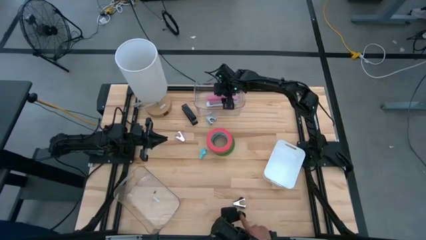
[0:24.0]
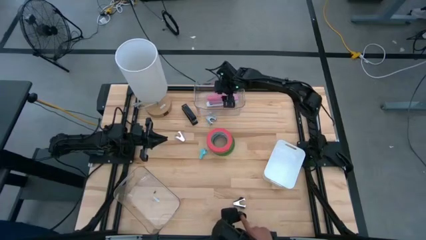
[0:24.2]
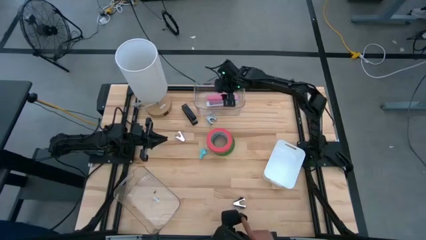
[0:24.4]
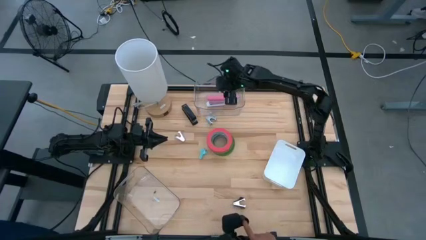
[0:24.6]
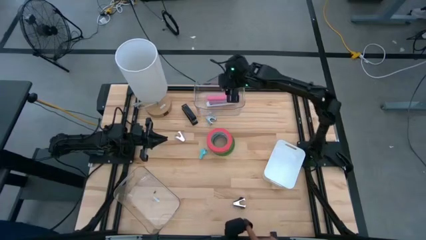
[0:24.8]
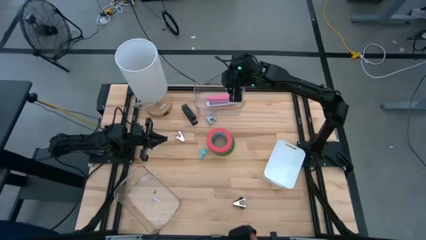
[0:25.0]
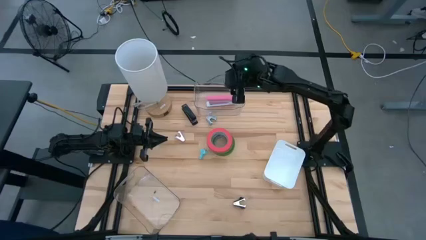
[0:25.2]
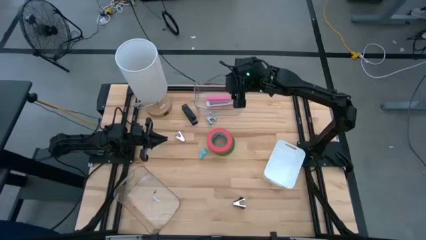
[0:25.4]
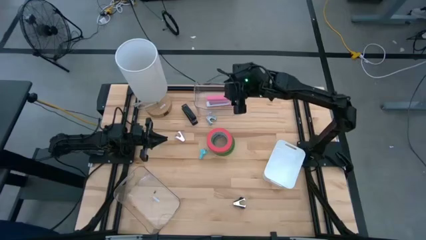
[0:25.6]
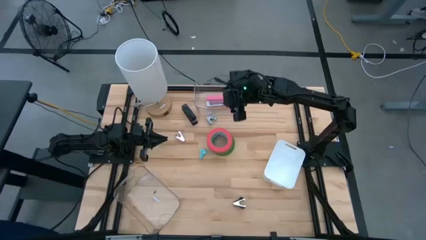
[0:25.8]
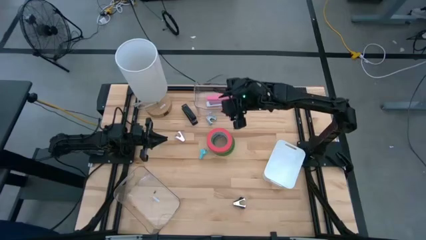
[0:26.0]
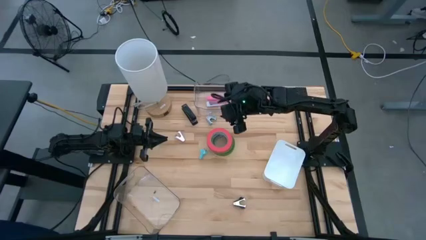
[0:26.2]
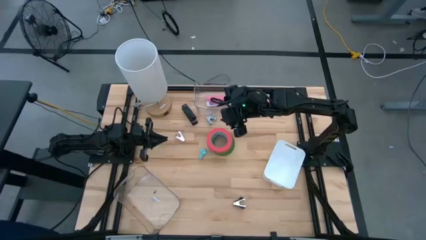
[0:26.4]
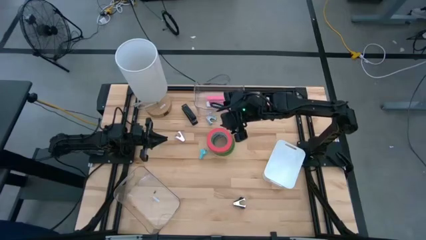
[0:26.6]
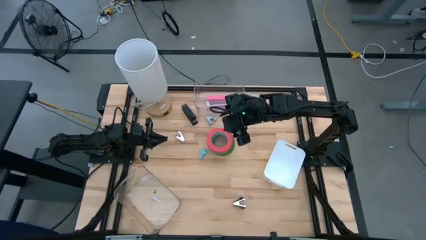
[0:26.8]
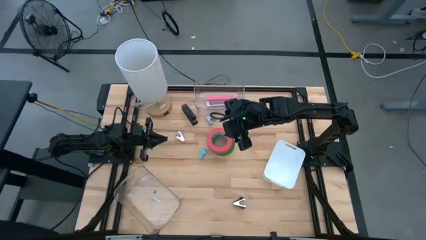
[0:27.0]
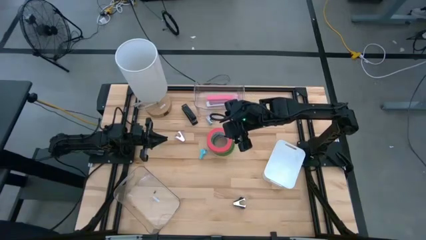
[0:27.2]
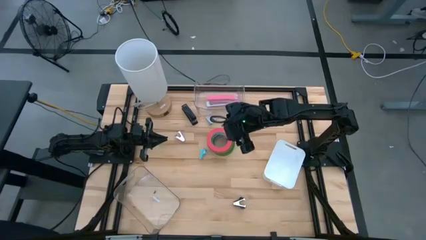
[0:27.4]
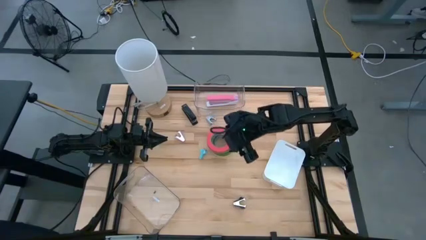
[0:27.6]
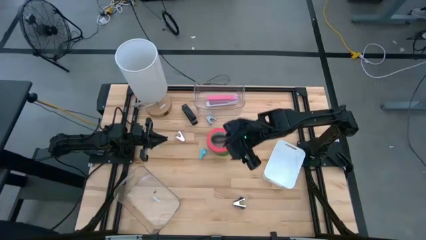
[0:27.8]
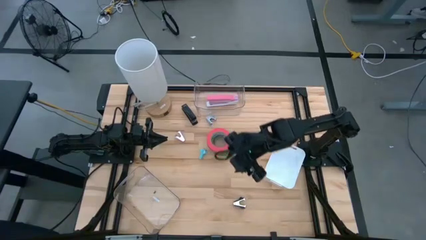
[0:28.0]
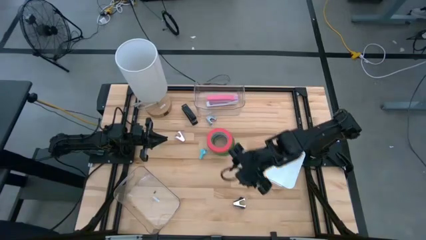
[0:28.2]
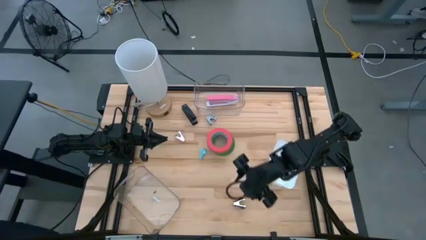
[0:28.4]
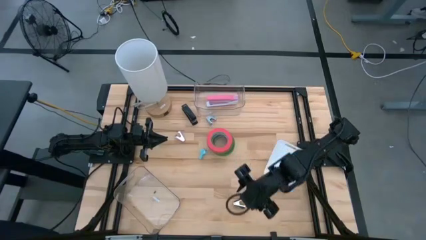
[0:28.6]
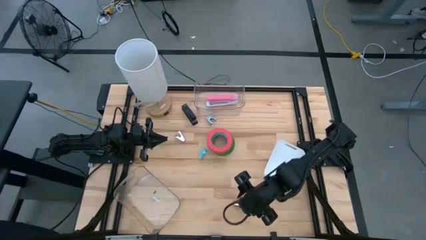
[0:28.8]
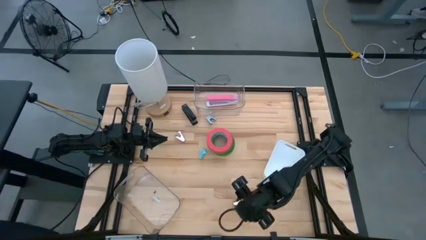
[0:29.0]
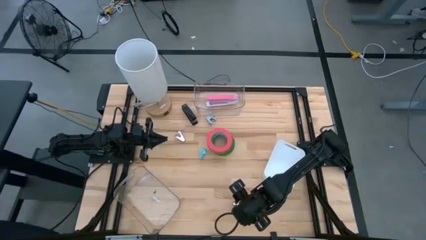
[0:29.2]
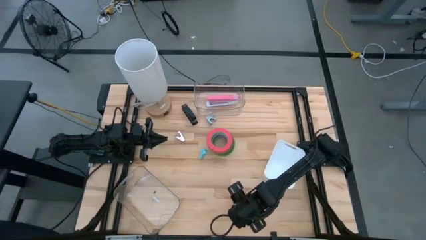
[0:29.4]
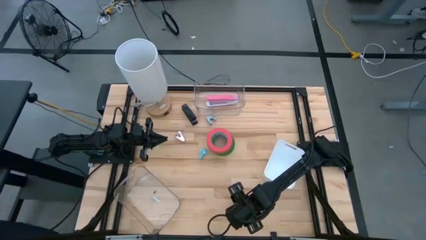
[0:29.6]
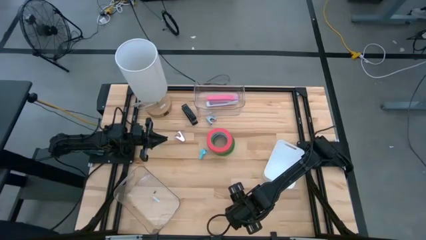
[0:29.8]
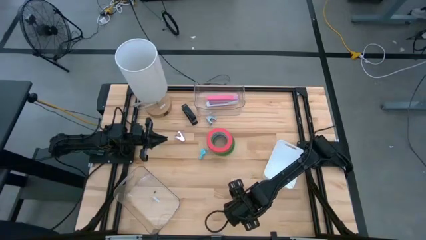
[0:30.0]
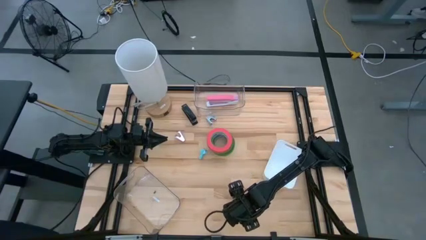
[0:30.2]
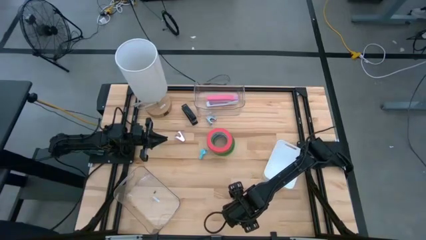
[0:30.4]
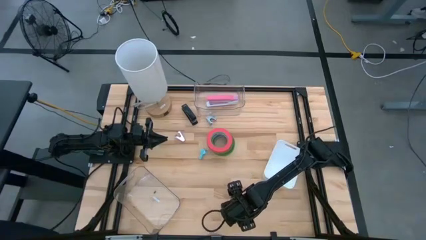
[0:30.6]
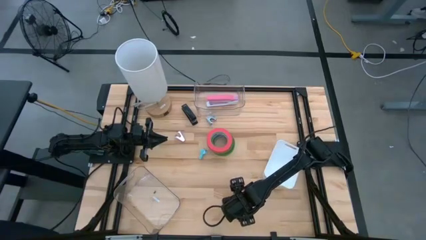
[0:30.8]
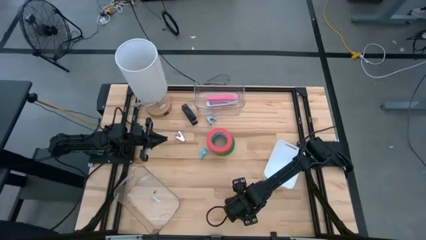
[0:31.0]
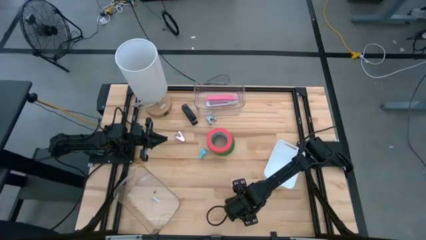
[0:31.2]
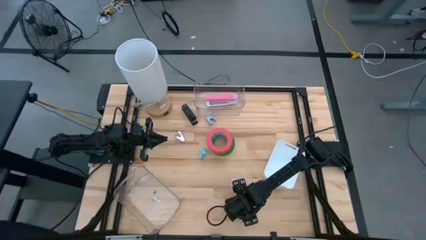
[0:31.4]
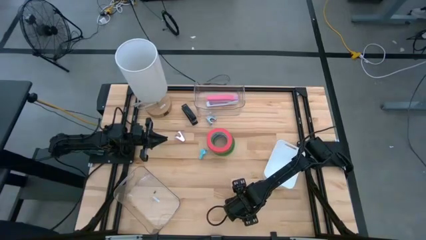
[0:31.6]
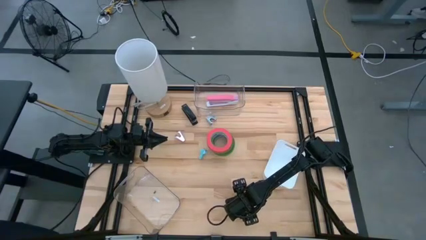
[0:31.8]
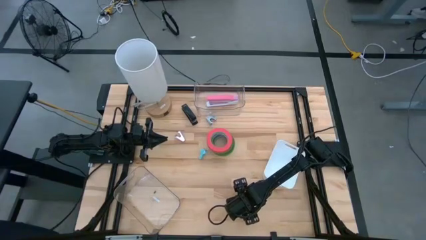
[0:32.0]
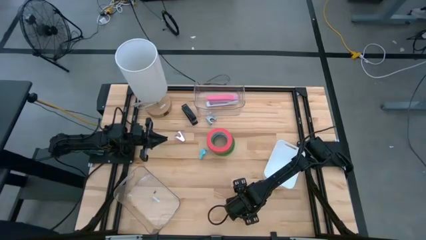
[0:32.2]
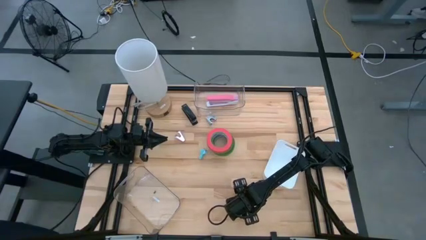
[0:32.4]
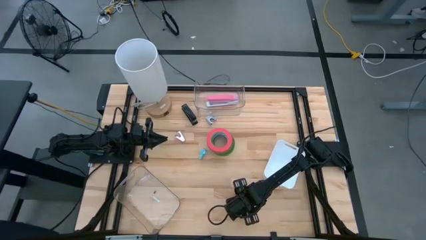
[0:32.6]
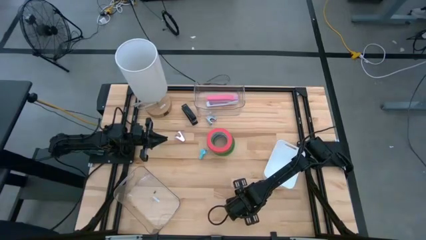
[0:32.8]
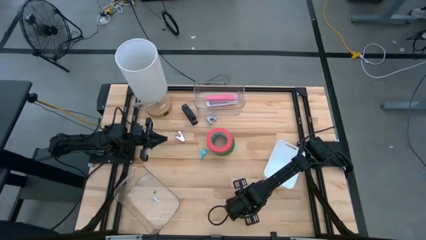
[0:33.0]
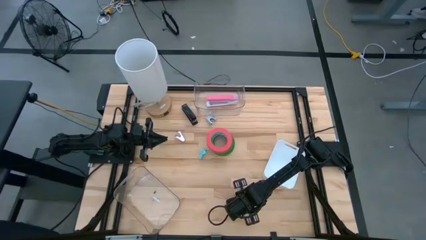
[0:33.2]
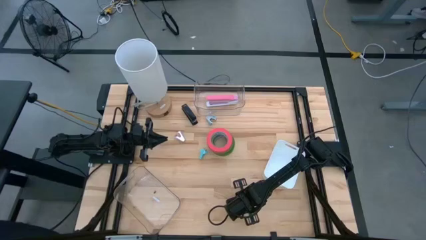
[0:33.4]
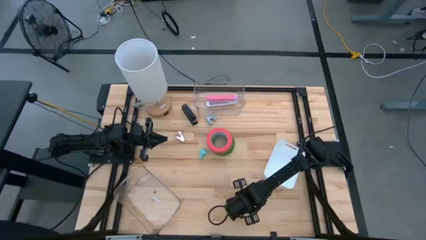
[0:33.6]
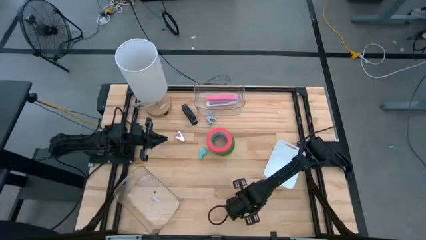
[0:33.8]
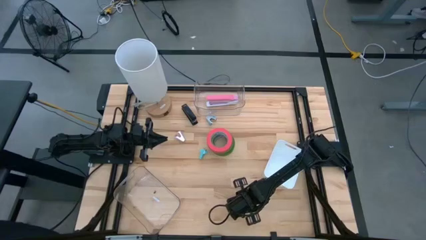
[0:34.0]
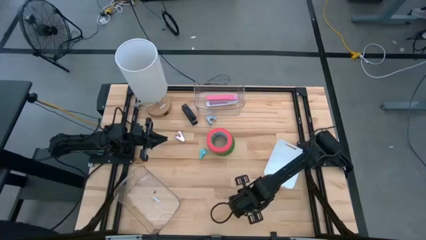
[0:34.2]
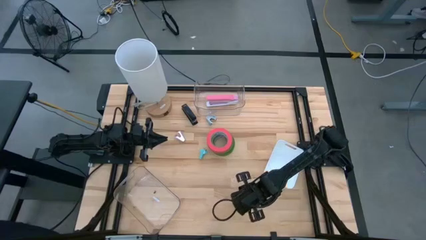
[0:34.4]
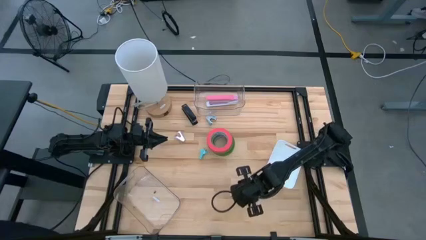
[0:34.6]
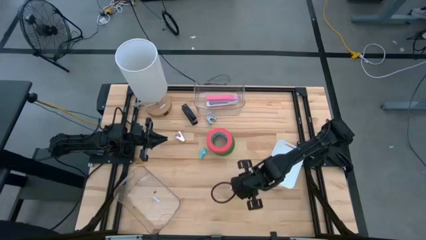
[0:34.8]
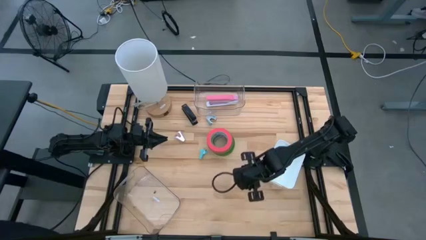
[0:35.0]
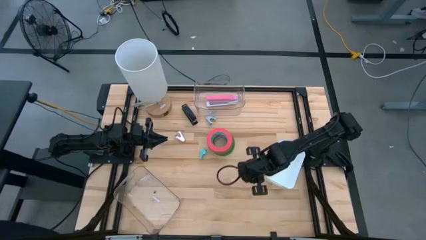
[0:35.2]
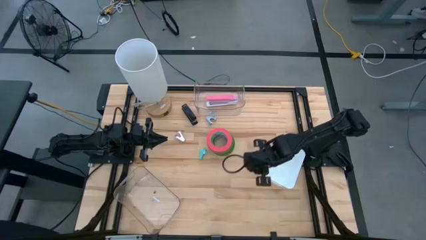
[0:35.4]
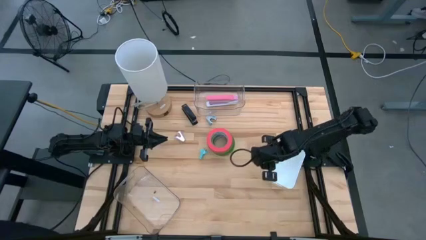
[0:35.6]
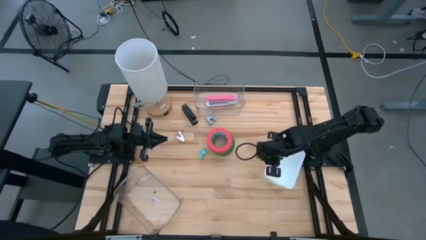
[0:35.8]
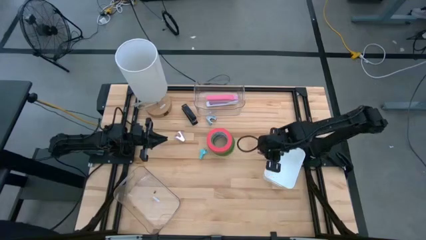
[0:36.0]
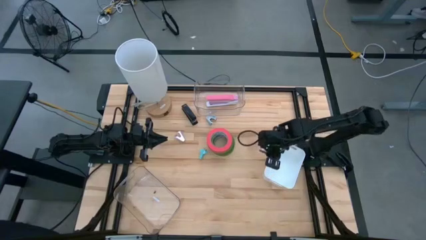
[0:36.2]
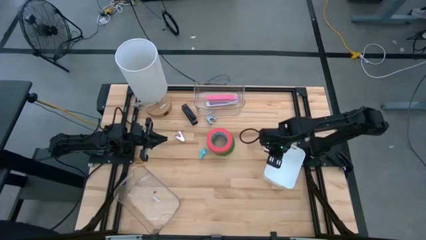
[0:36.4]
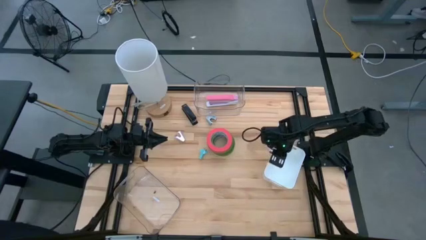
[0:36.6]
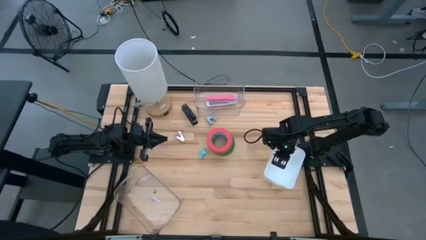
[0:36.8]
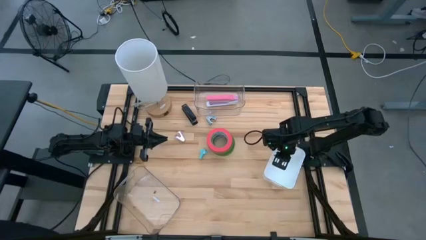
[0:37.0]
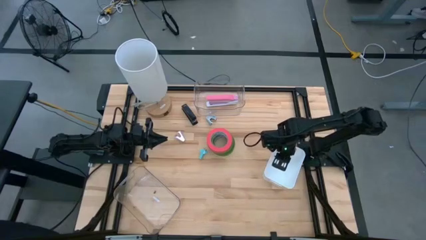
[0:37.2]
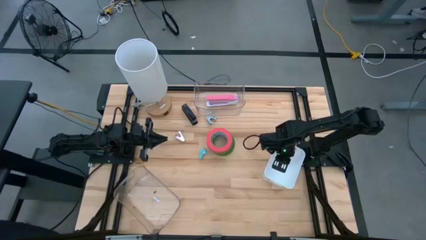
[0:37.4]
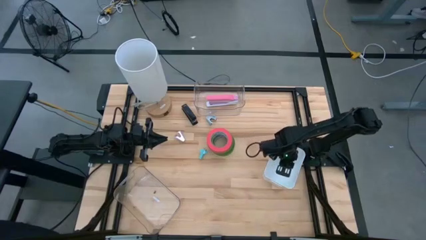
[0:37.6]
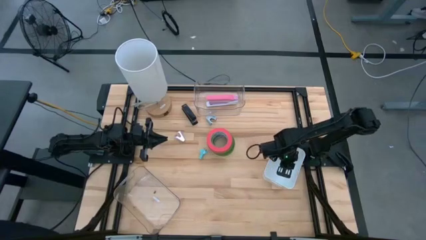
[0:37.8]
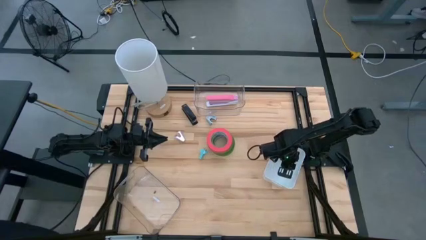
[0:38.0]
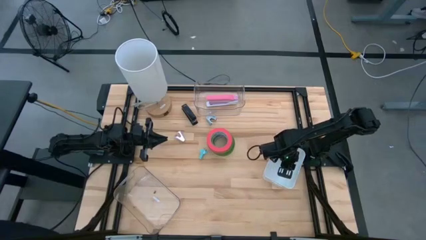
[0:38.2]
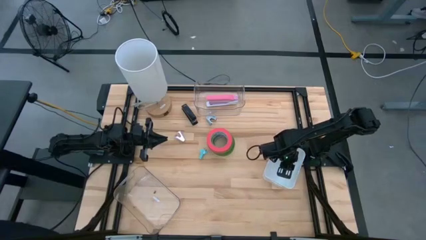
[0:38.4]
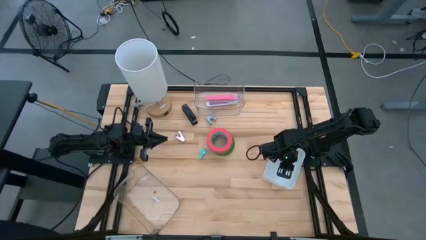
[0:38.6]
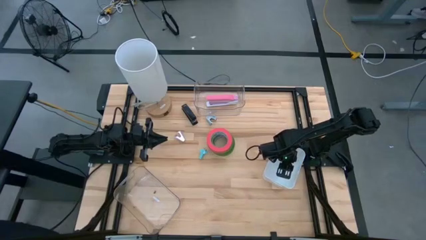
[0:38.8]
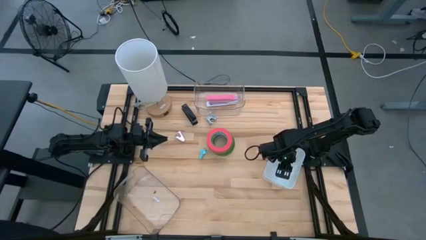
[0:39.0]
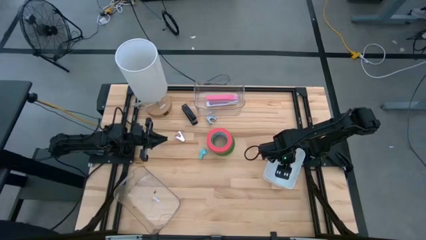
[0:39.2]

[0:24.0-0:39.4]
Task: Pick and place Stapler, Stapler remover, tape
Put the gray staple remover into the white bin
